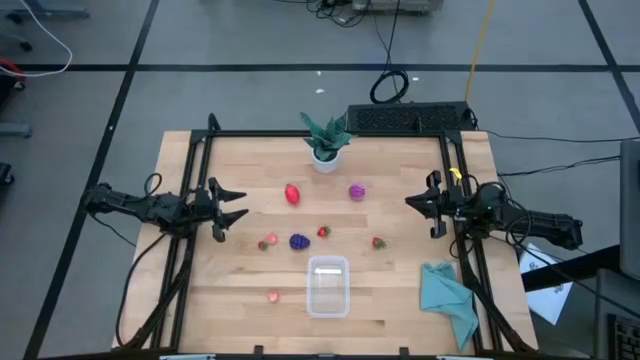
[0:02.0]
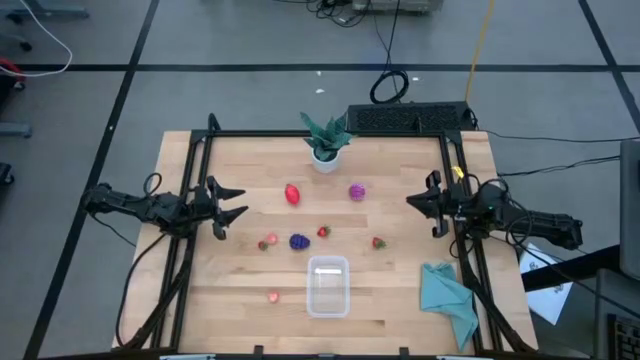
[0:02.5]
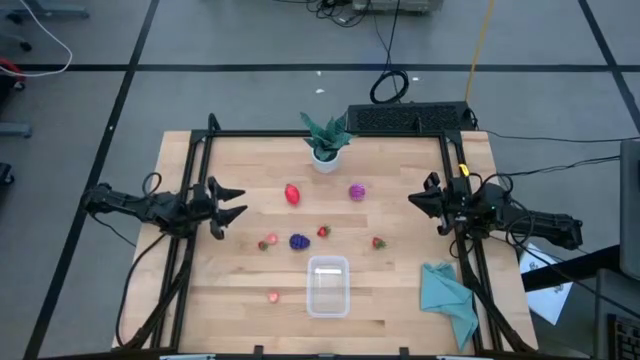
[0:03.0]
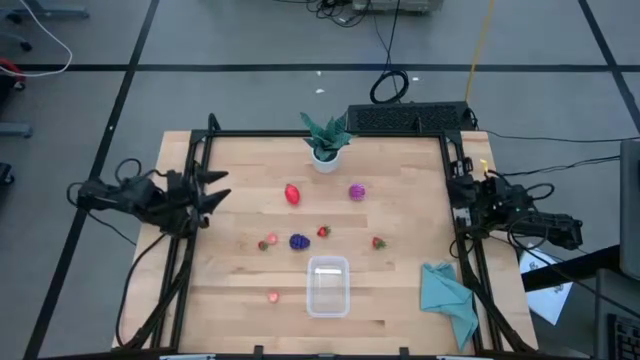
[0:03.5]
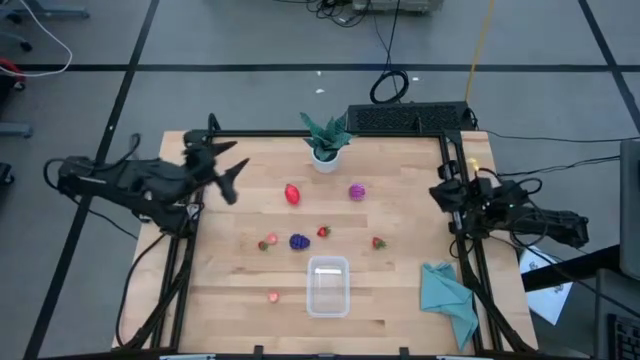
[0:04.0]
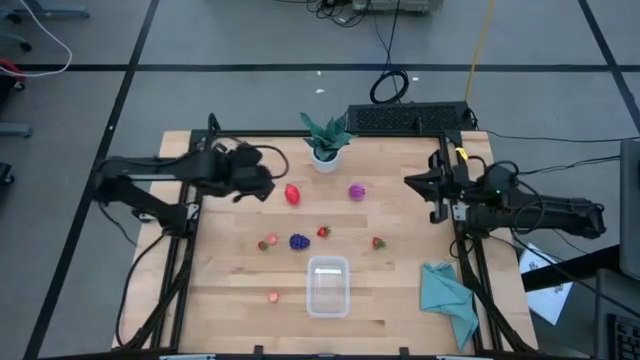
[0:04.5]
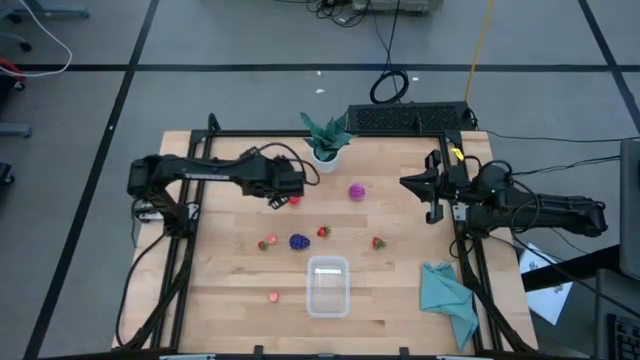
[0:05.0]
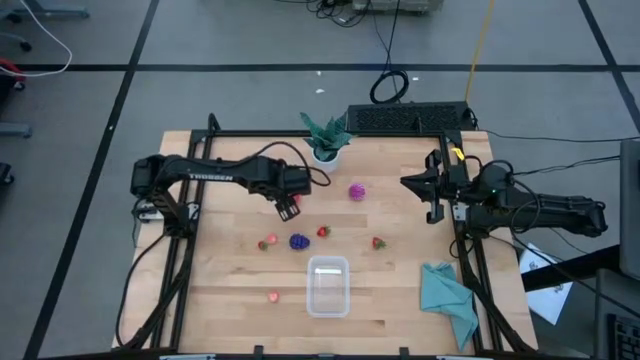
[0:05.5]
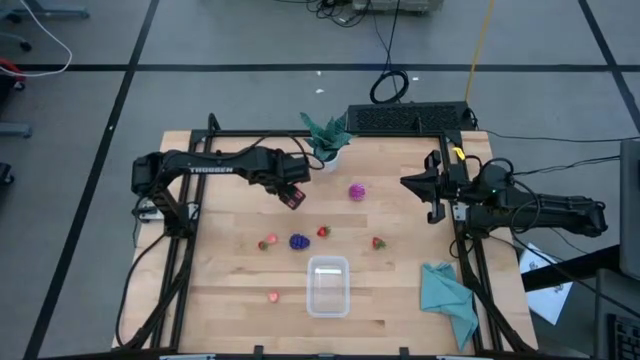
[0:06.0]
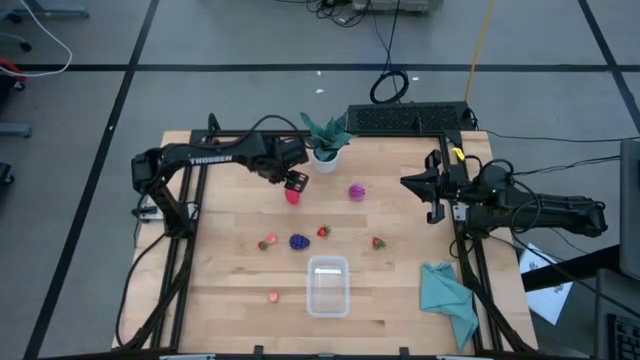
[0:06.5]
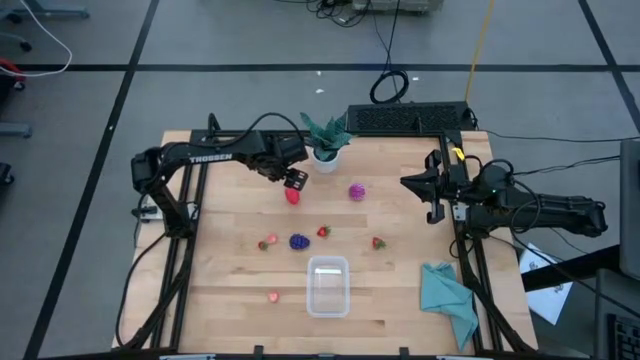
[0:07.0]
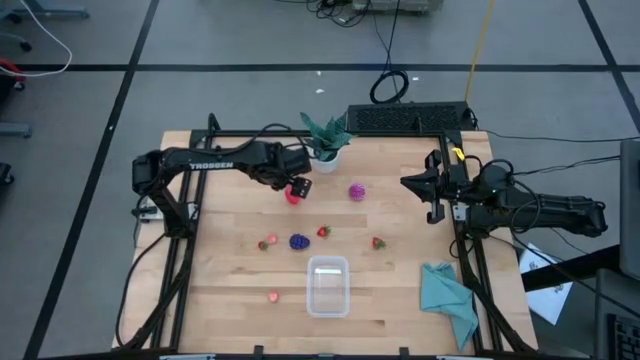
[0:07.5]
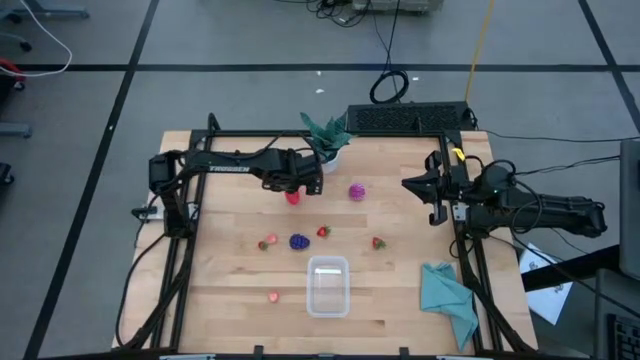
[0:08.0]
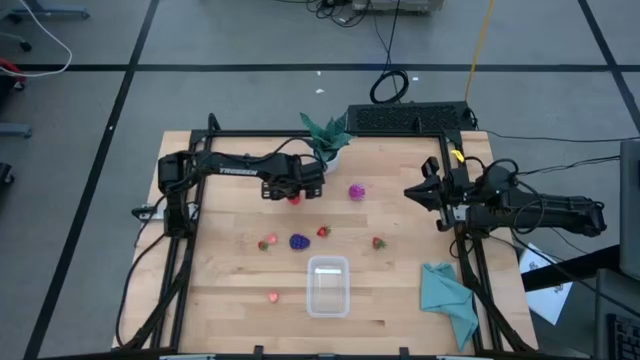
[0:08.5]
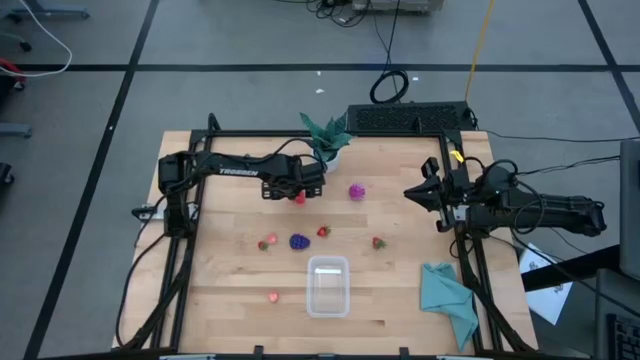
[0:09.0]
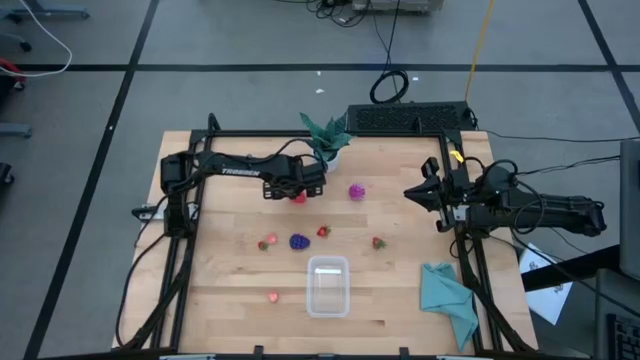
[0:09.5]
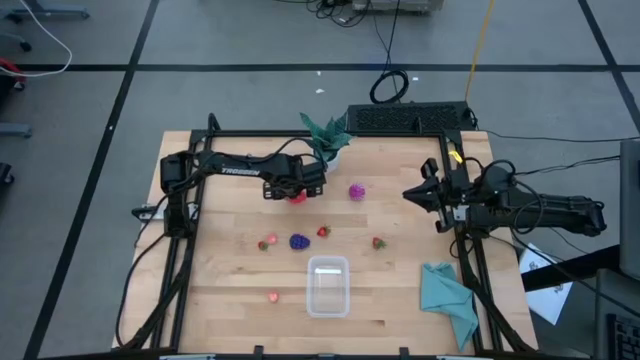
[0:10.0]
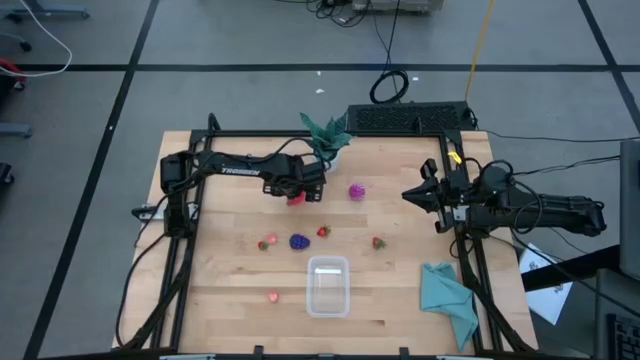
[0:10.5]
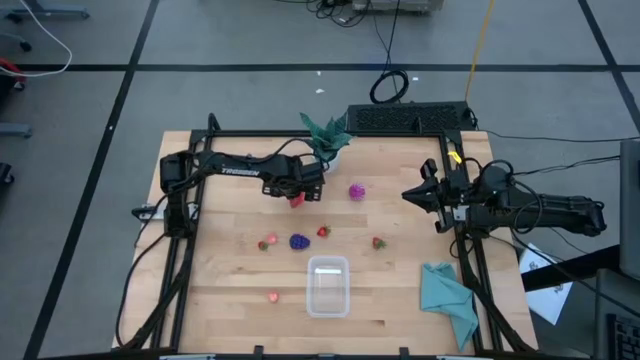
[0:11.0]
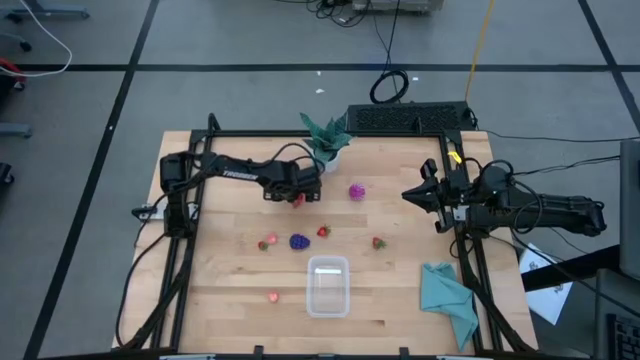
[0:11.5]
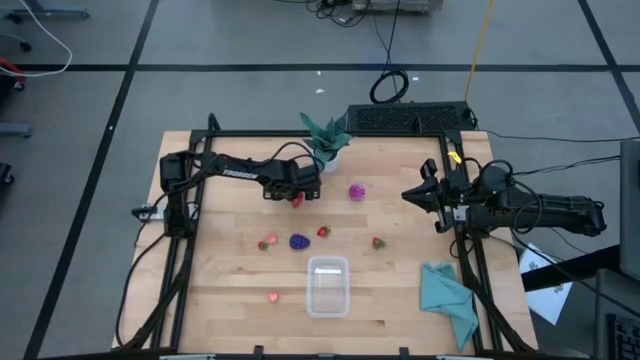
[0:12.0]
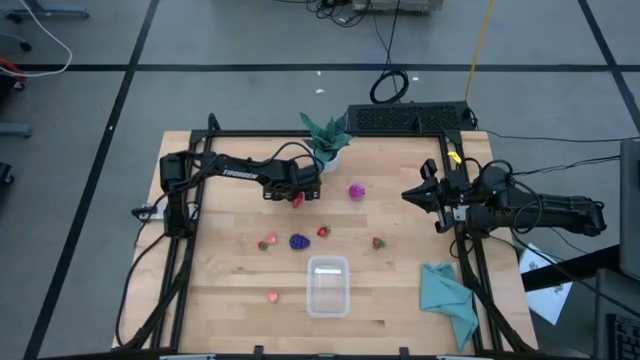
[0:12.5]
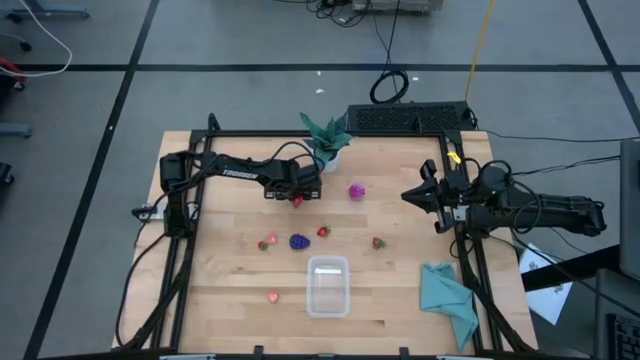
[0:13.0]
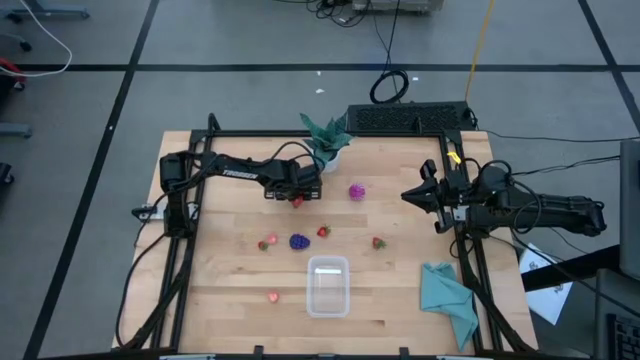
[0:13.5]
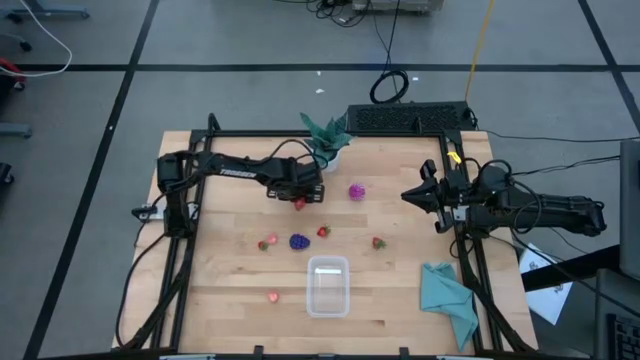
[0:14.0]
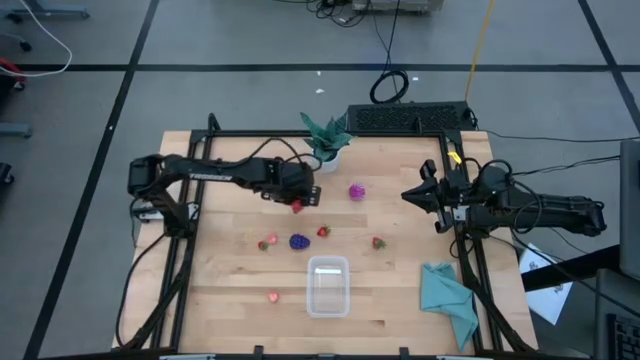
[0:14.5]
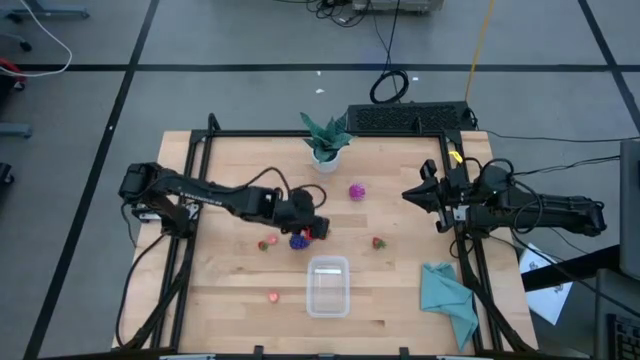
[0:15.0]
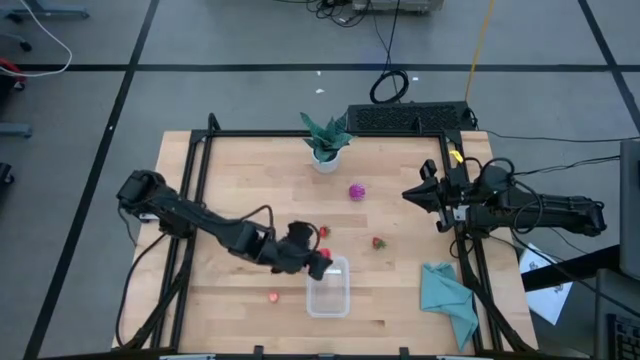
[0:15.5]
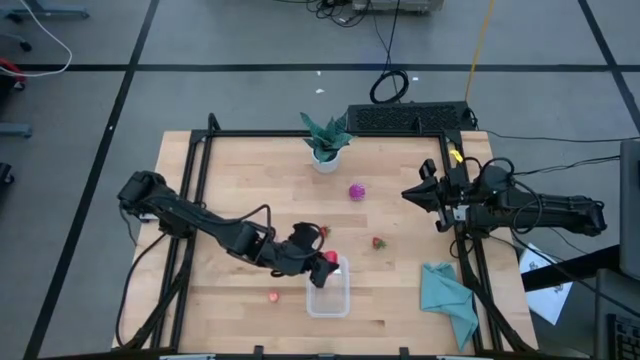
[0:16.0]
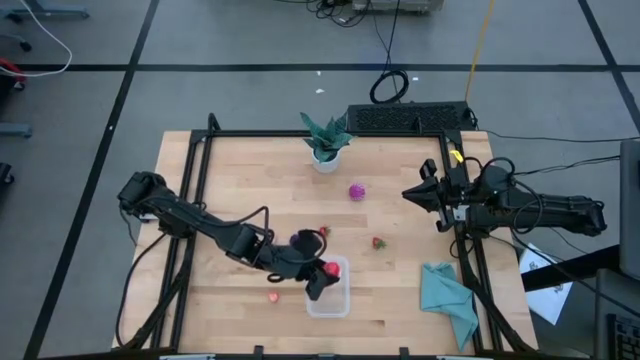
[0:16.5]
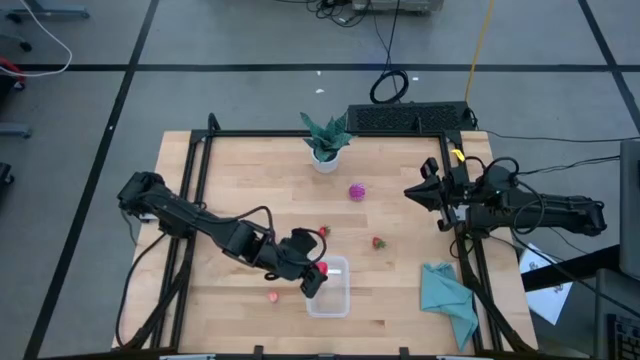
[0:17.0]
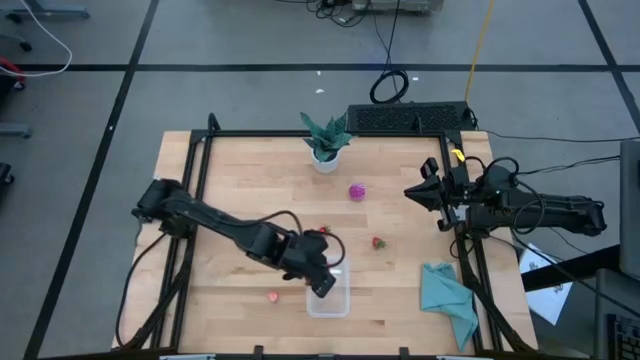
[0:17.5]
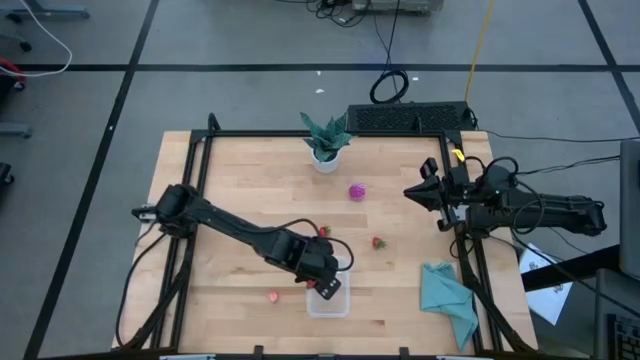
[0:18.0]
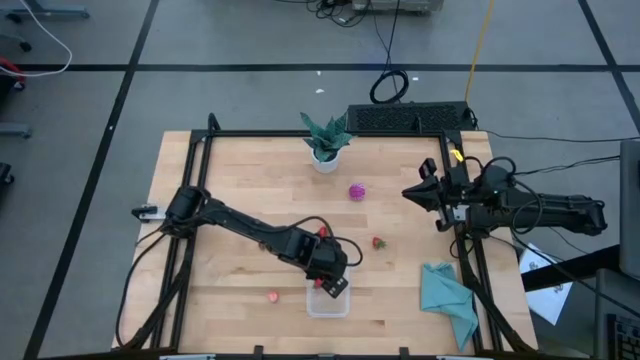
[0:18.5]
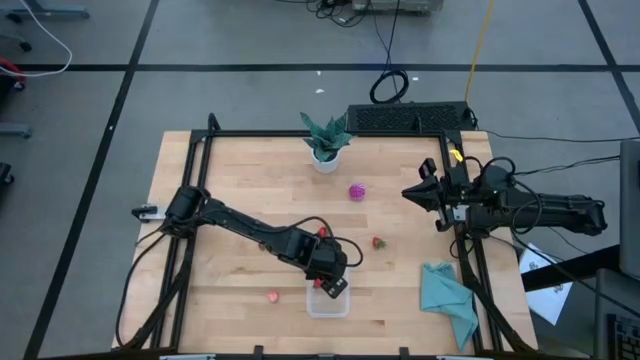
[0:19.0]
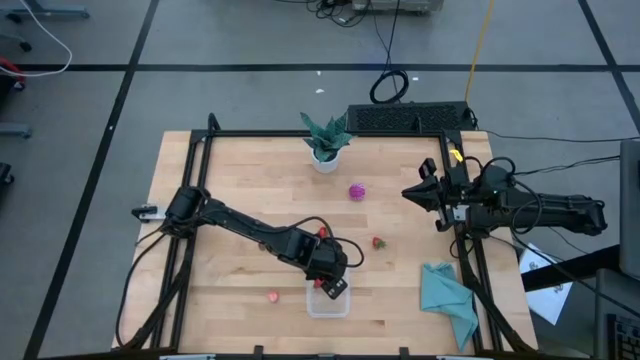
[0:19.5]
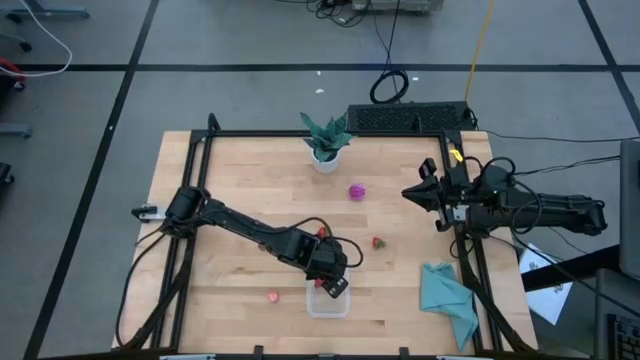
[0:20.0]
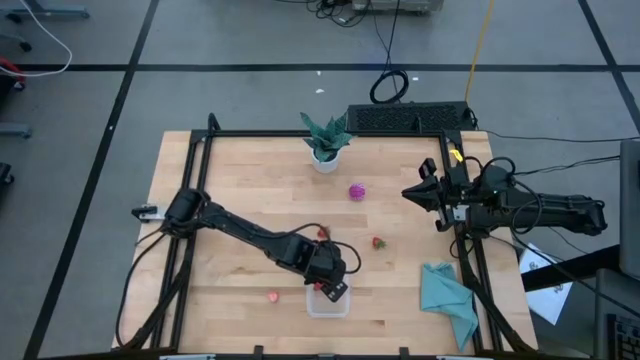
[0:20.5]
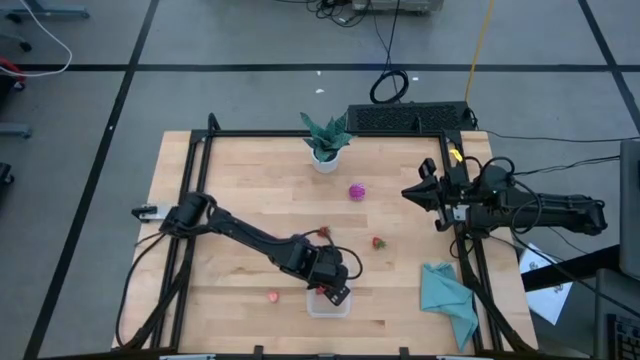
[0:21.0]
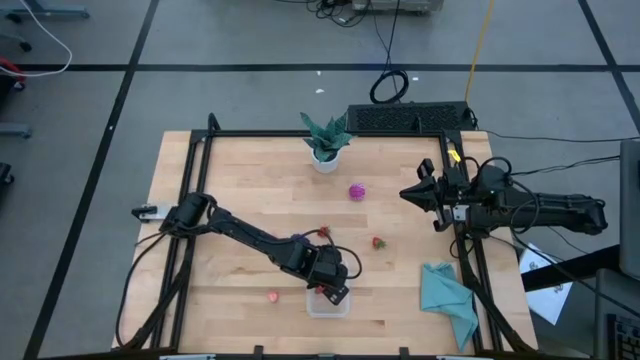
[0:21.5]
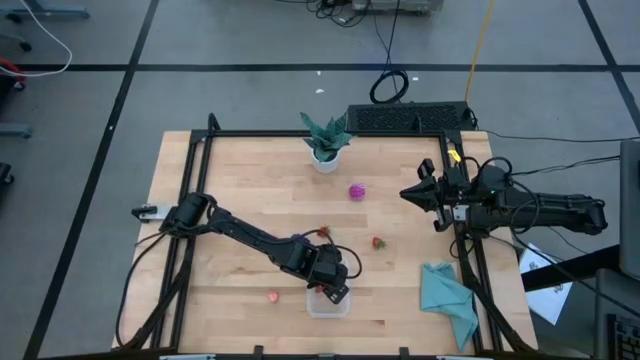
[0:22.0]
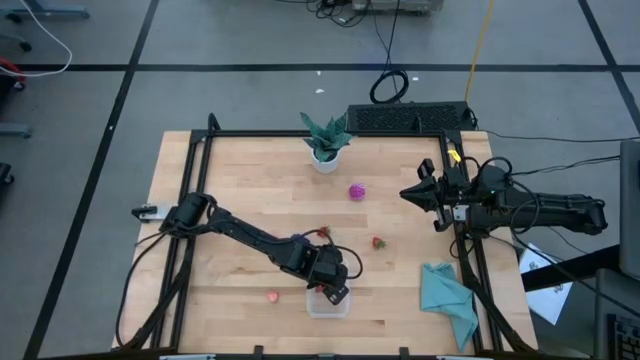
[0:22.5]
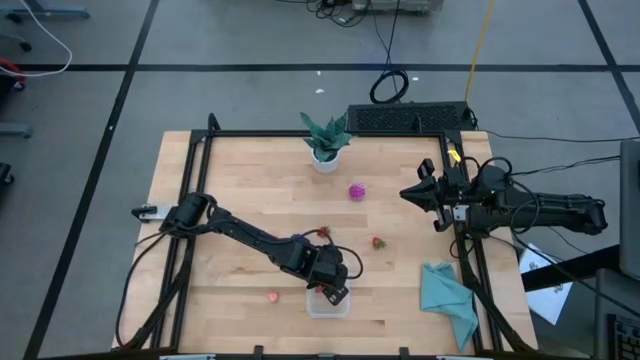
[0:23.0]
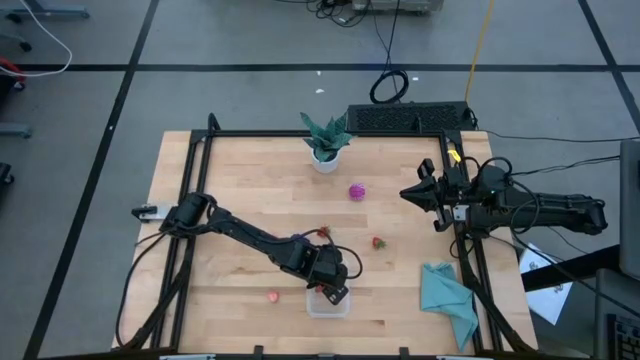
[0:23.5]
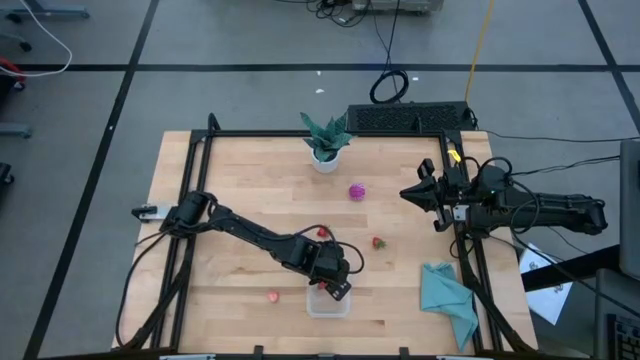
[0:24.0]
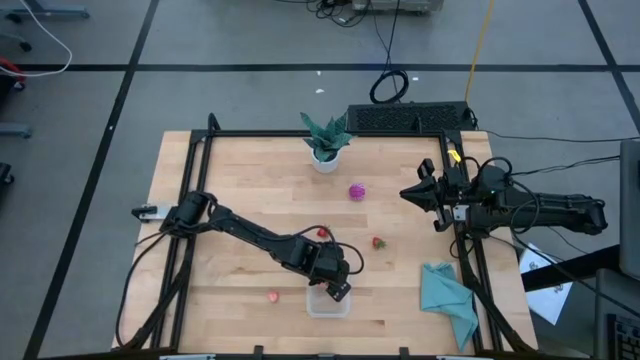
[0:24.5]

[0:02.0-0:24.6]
Task: Pick and placing Produce into tupperware
Put the pink dragon fruit into the transparent container
